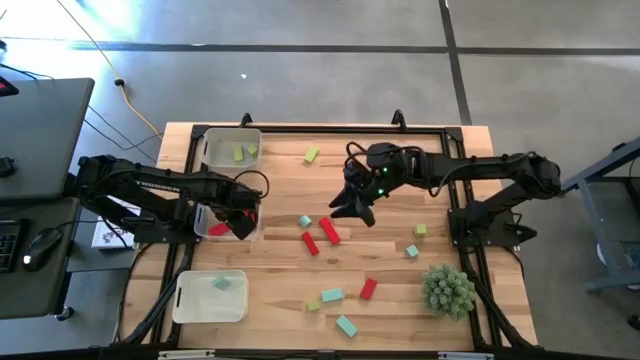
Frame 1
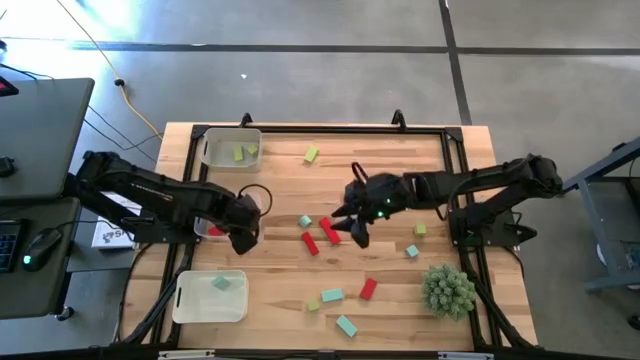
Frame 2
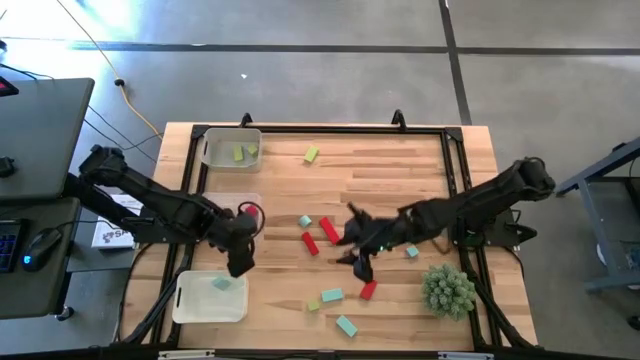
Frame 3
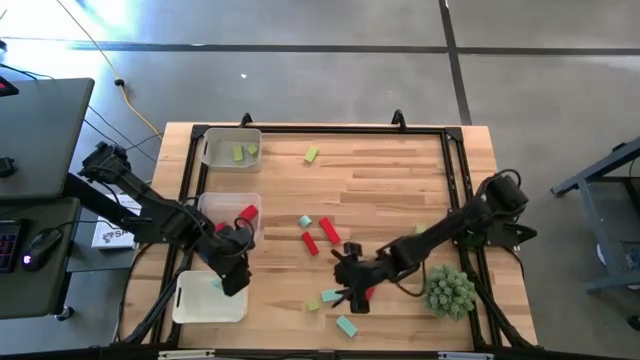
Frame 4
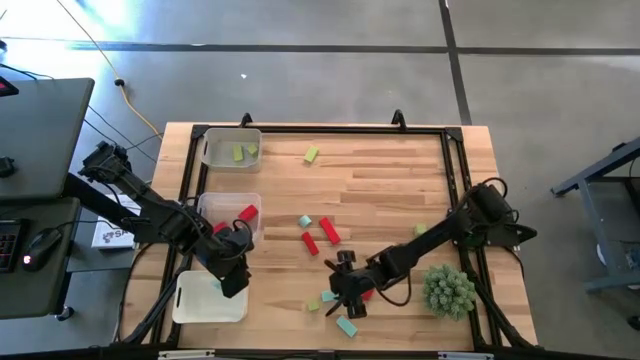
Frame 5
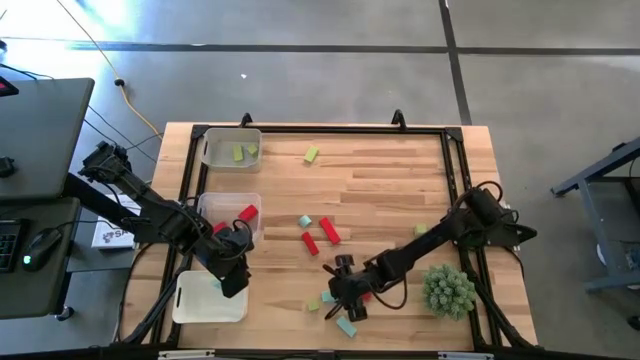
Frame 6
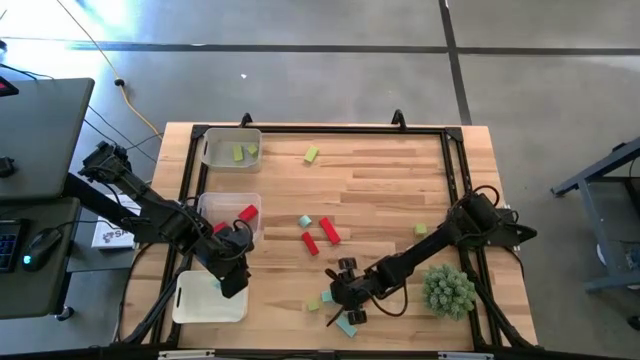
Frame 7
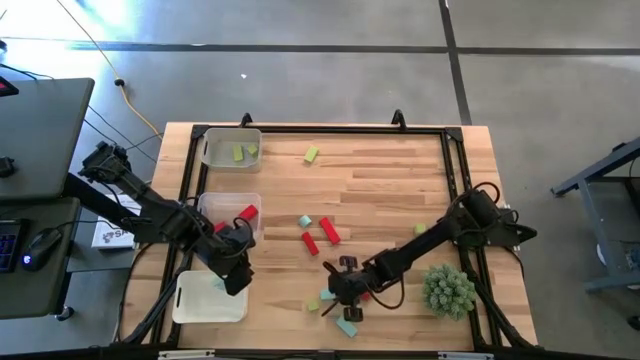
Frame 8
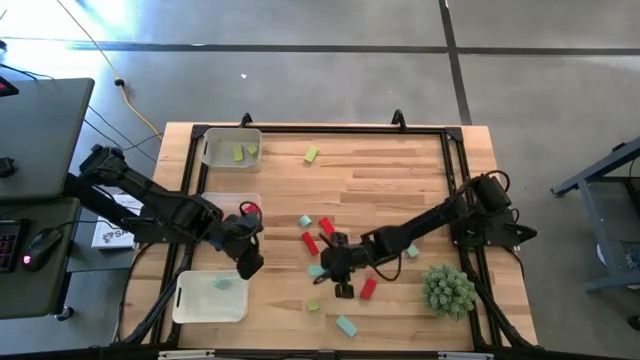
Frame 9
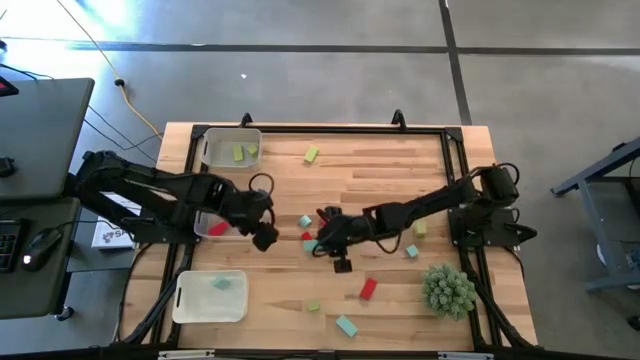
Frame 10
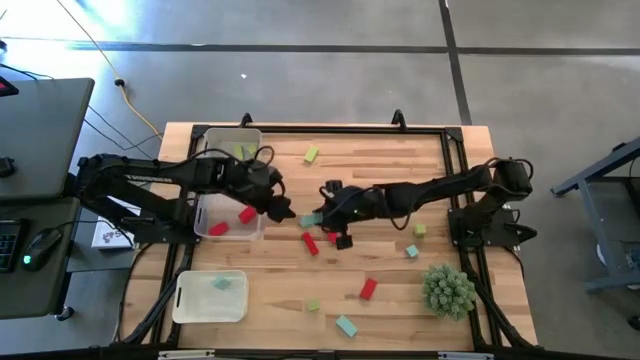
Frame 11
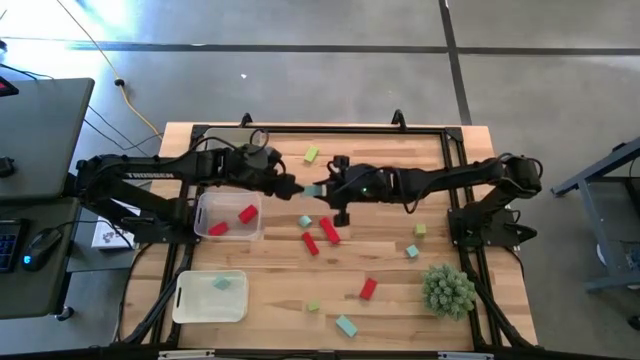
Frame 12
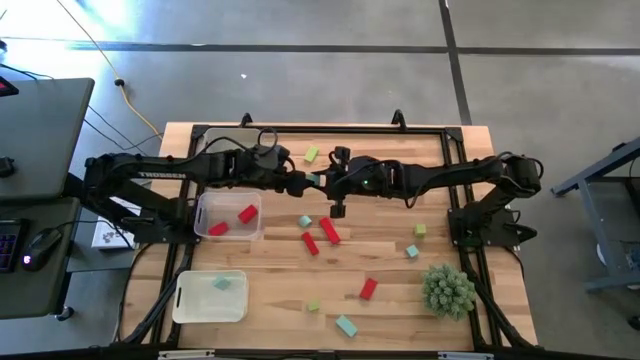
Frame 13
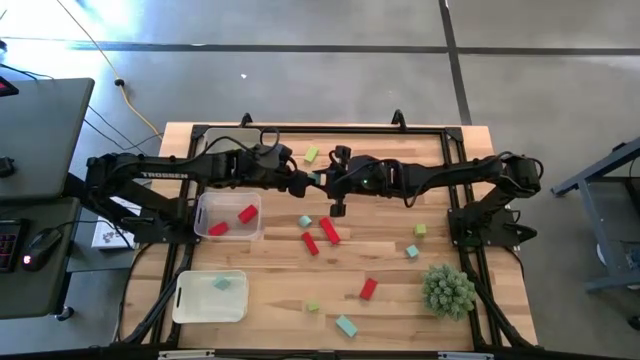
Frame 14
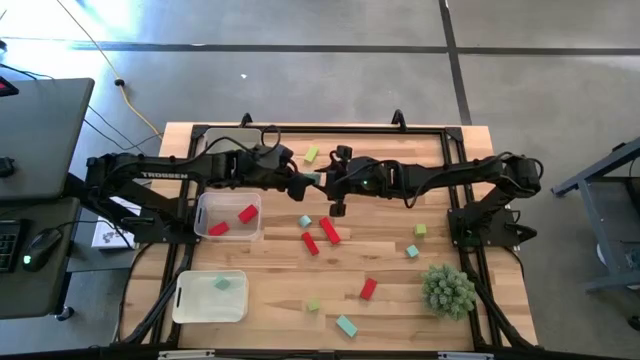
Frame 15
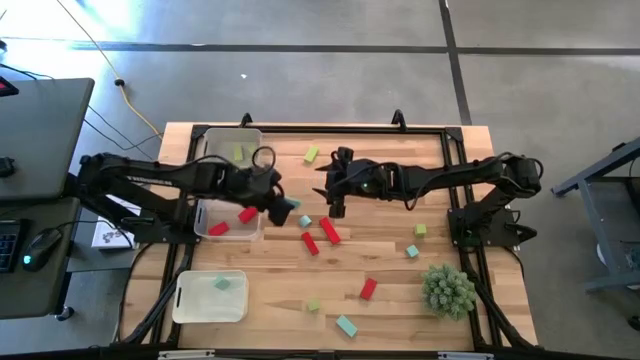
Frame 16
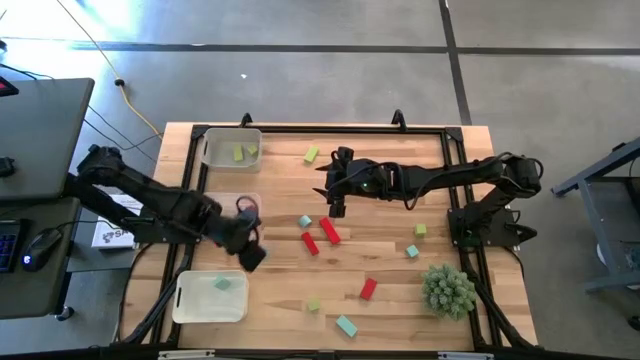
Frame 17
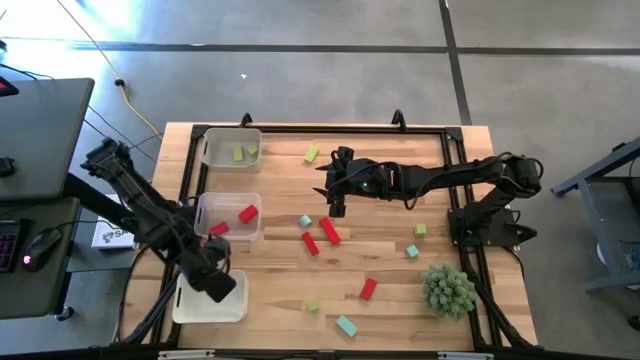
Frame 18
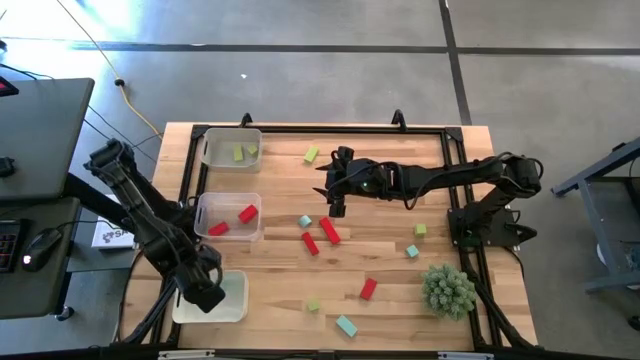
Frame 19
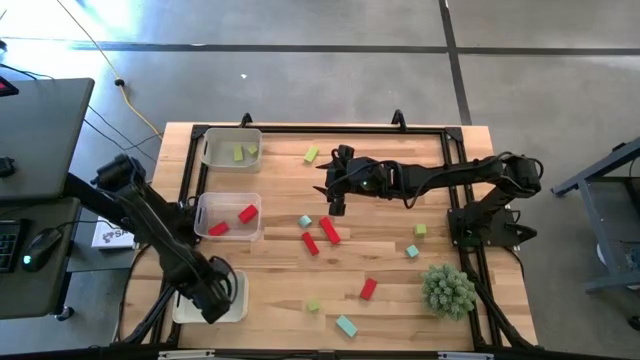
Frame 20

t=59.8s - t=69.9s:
Task: Sort & place blocks by color
Put the light blue block into the white bin

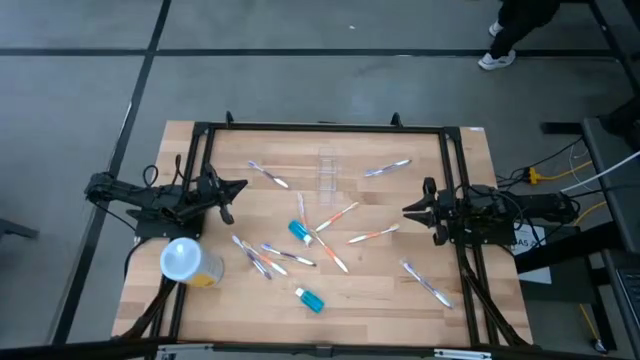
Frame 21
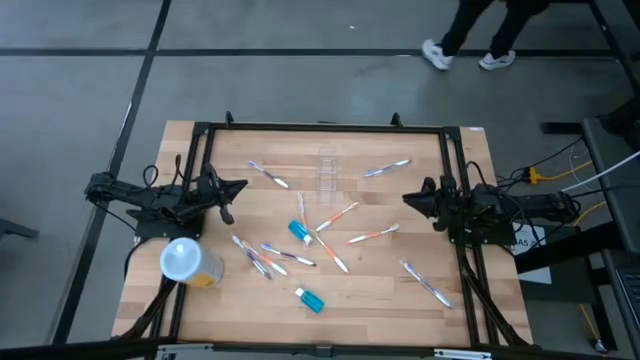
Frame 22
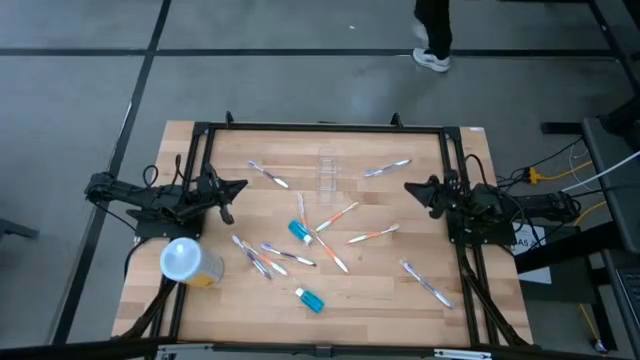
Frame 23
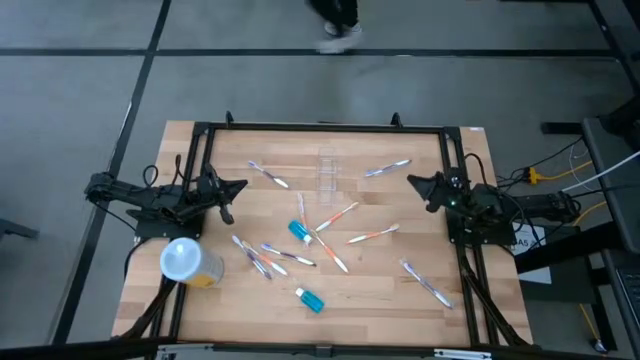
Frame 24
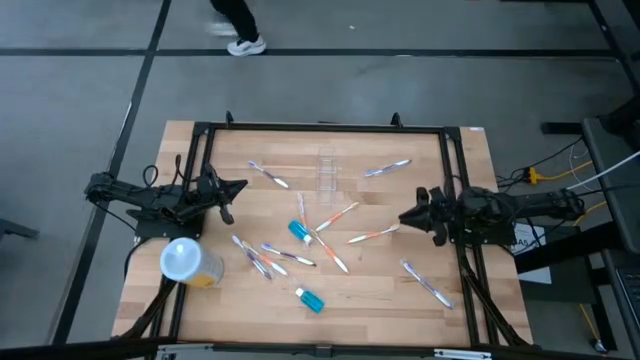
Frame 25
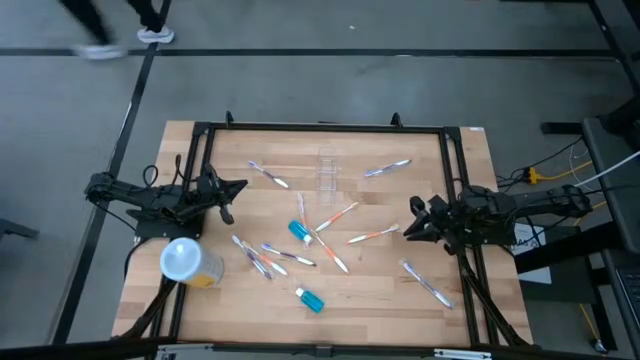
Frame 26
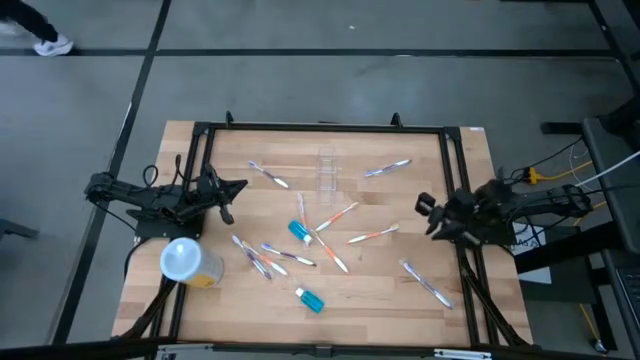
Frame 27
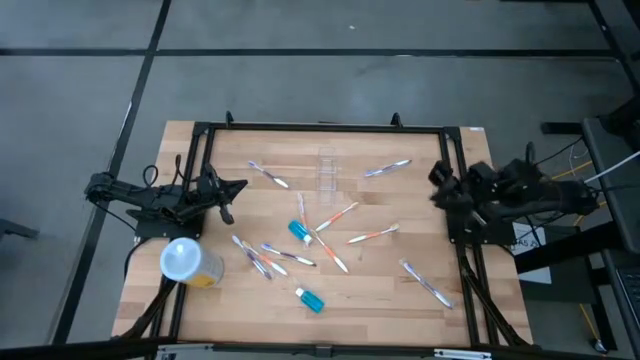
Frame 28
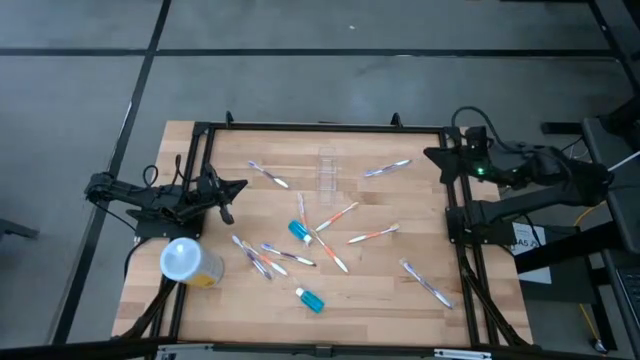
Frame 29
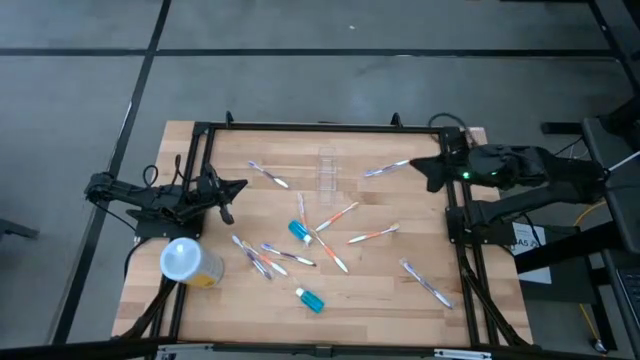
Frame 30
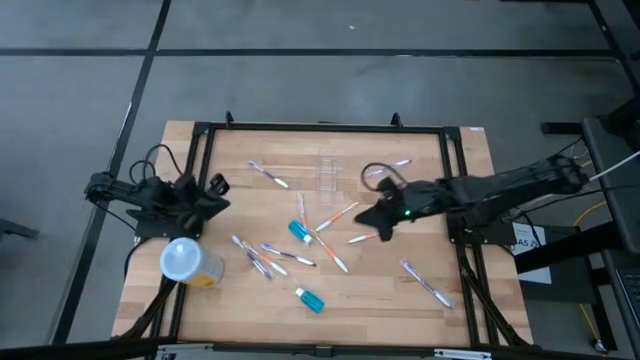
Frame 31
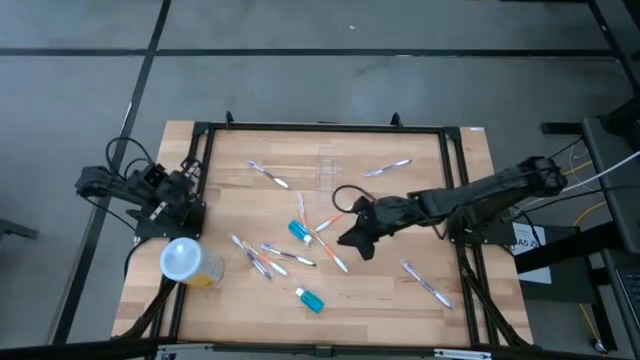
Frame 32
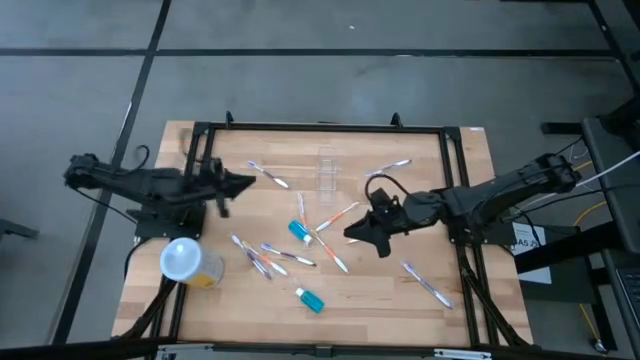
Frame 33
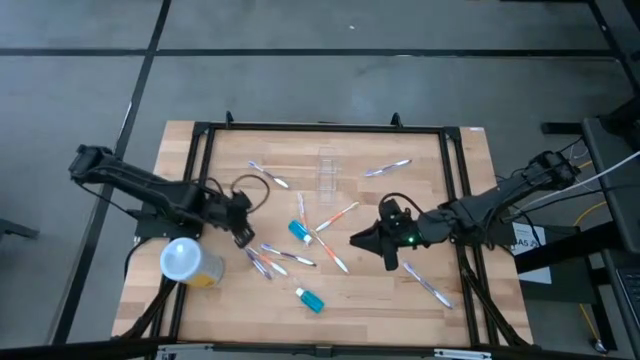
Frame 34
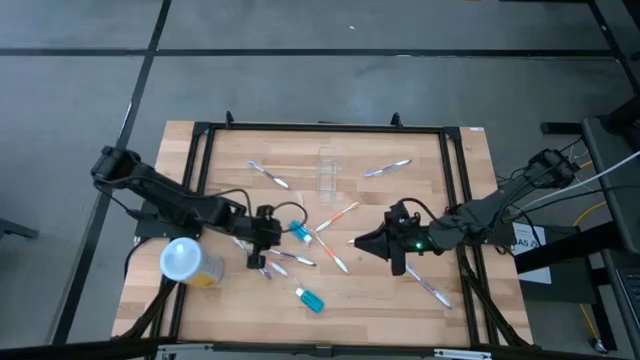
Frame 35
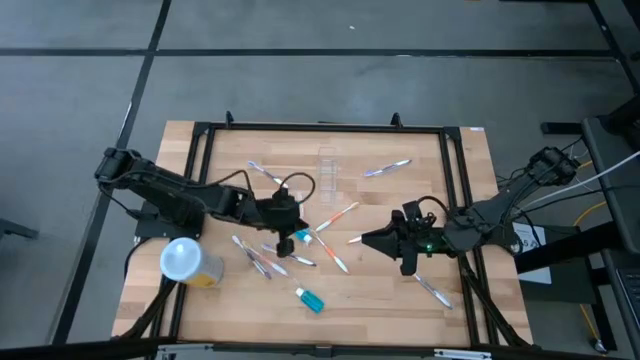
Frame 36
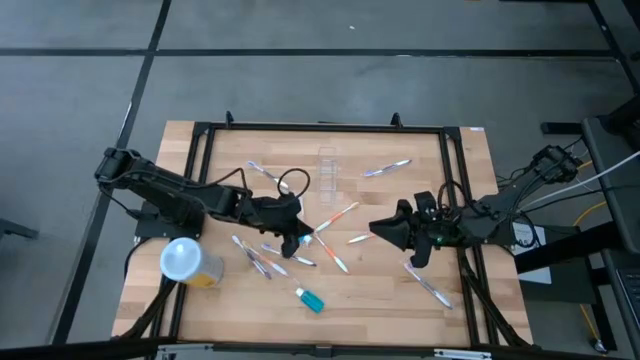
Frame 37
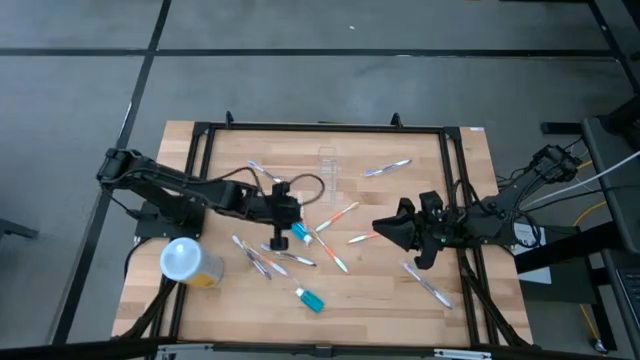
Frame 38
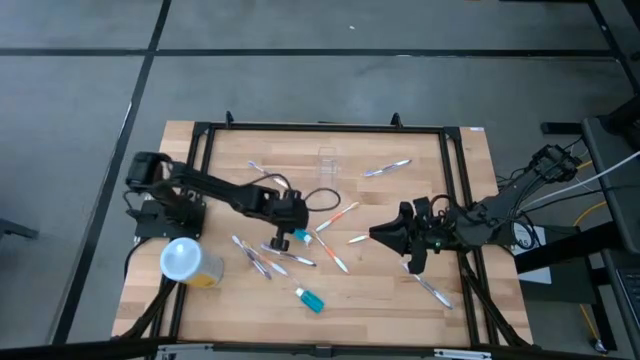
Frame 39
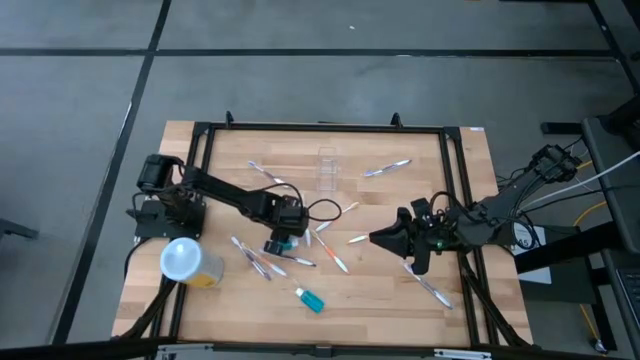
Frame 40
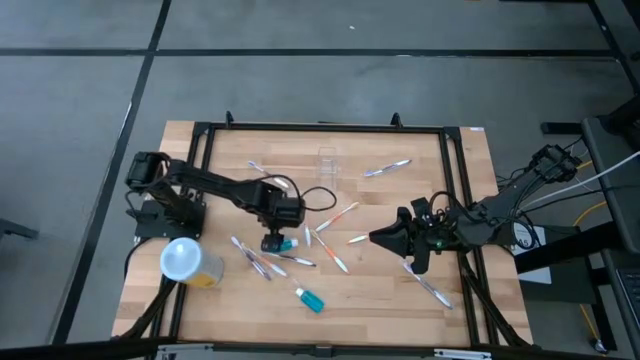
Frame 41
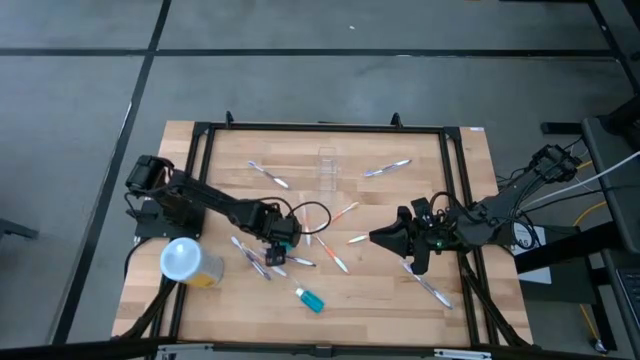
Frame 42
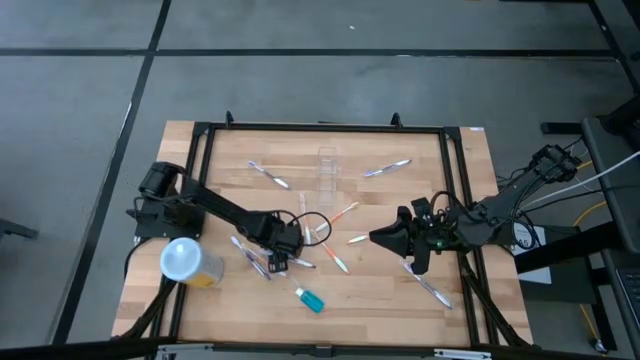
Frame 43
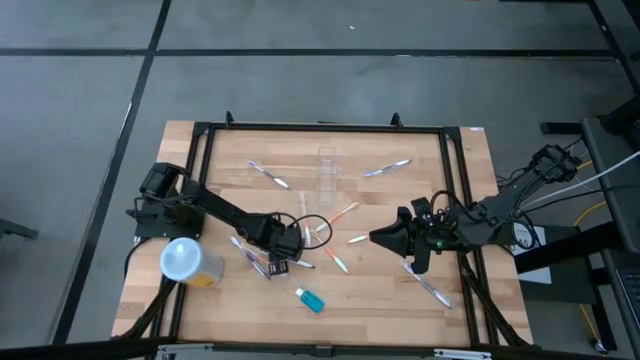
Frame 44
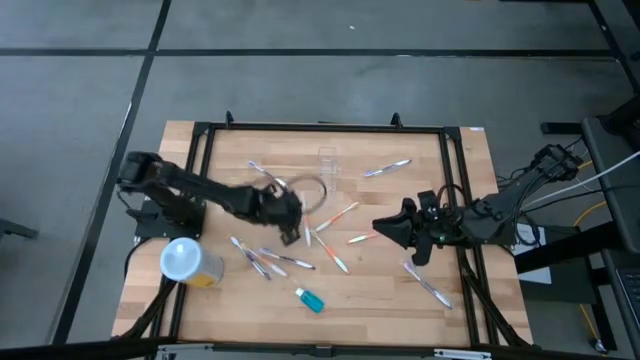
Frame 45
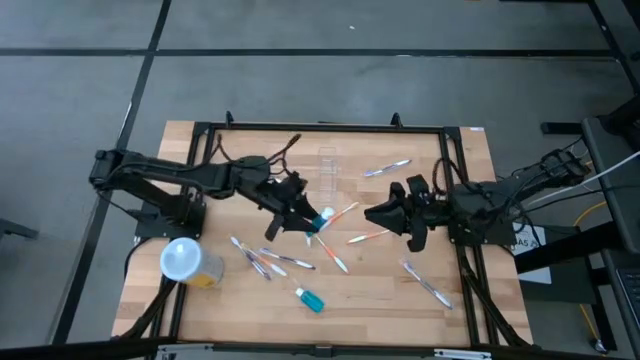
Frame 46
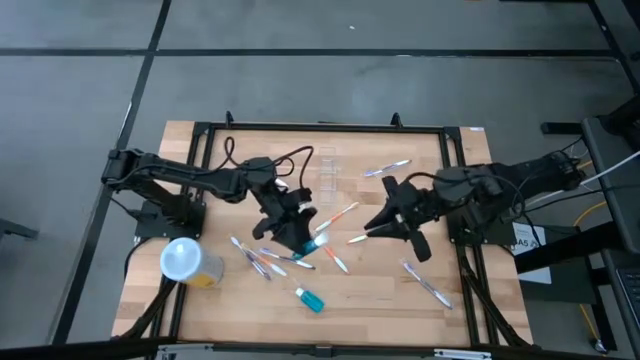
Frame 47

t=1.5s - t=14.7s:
Task: Pick & Place toothbrushing station
Put the blue mouthwash into the transparent organizer
